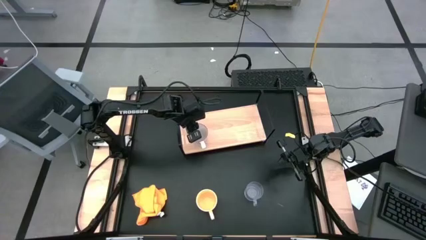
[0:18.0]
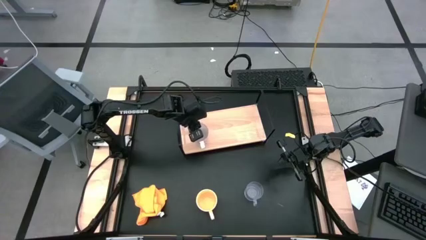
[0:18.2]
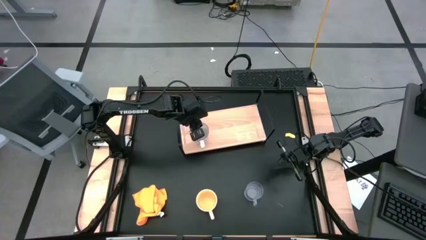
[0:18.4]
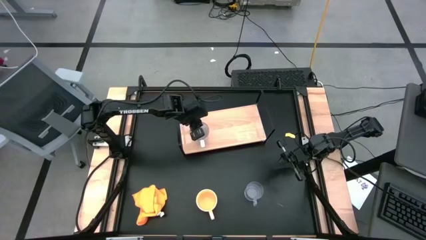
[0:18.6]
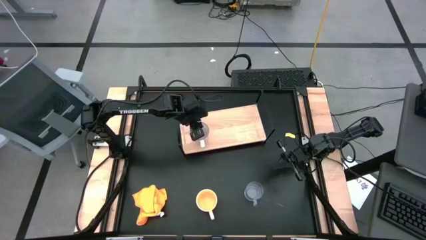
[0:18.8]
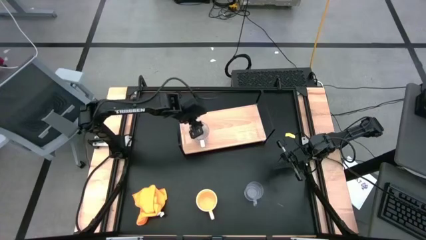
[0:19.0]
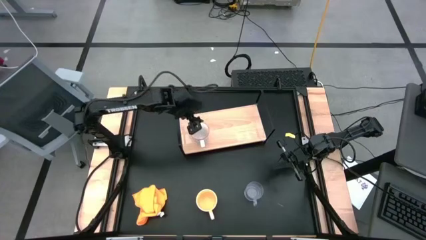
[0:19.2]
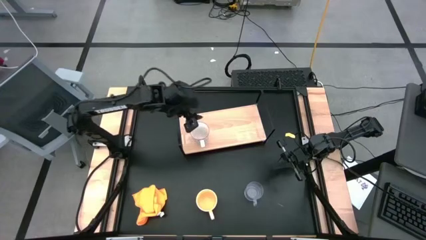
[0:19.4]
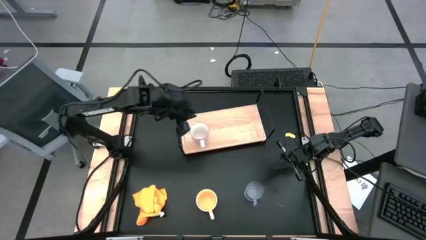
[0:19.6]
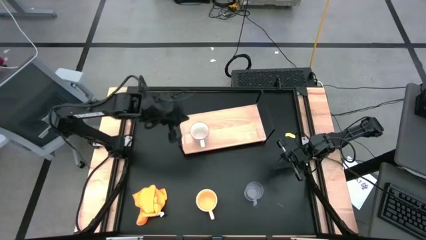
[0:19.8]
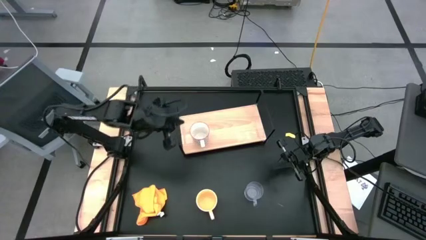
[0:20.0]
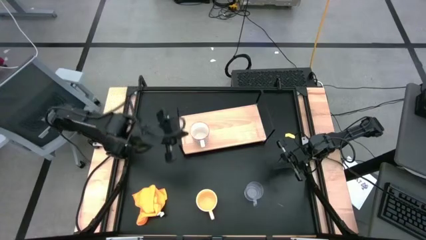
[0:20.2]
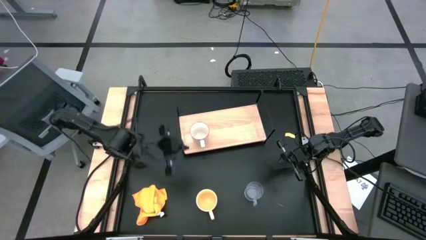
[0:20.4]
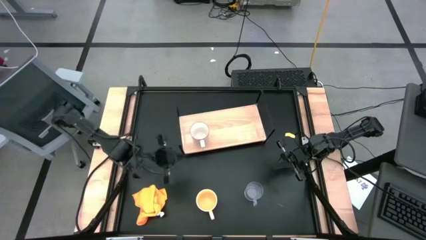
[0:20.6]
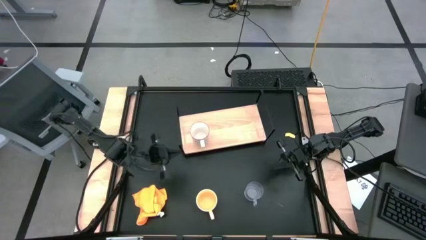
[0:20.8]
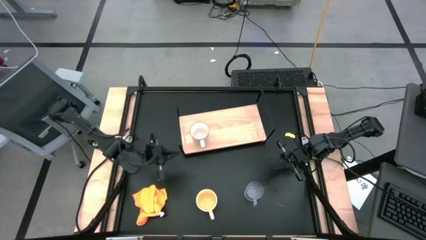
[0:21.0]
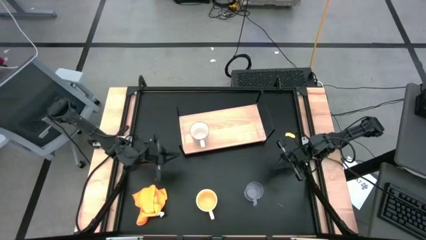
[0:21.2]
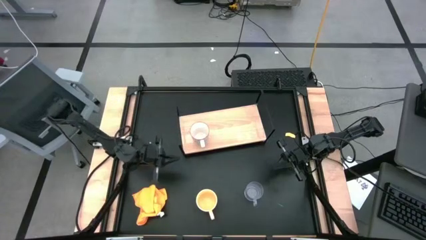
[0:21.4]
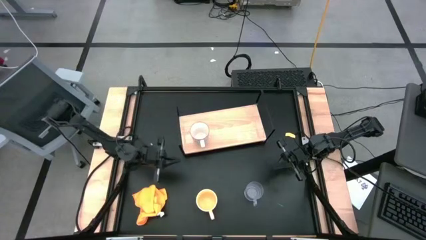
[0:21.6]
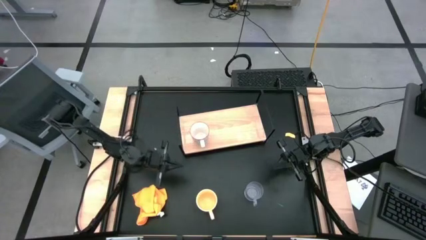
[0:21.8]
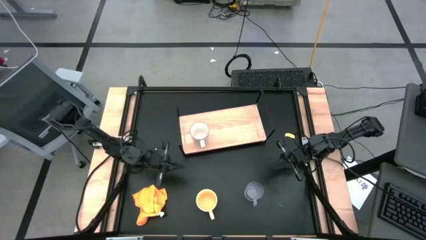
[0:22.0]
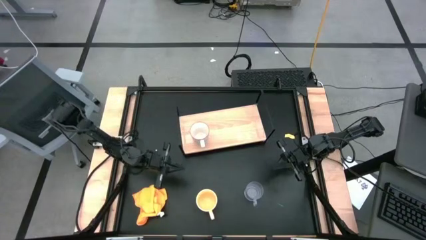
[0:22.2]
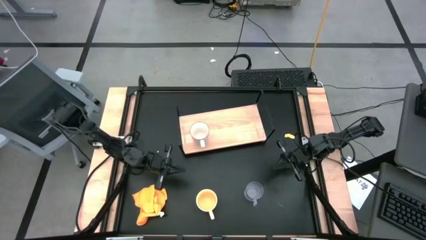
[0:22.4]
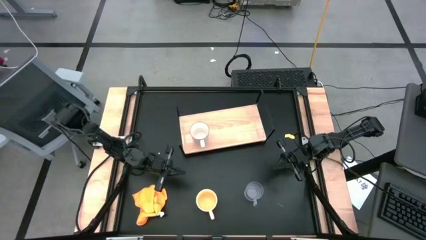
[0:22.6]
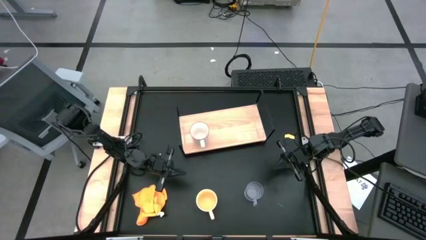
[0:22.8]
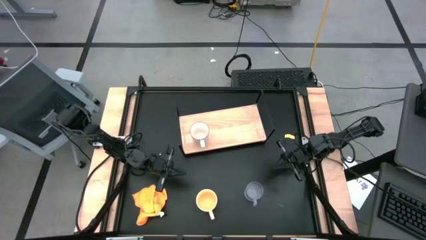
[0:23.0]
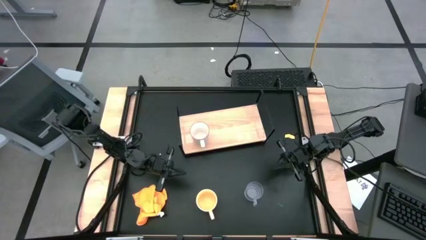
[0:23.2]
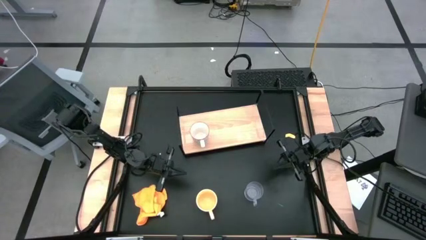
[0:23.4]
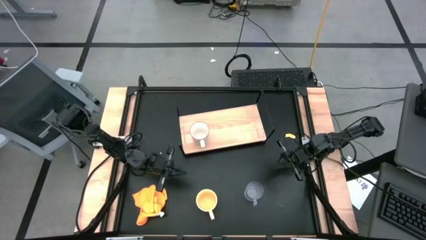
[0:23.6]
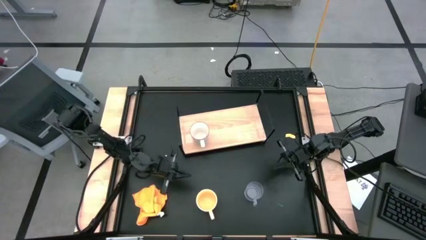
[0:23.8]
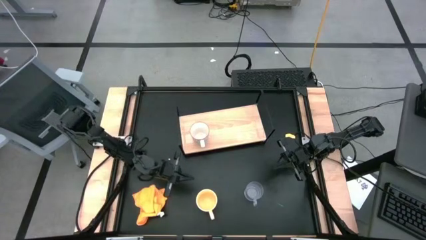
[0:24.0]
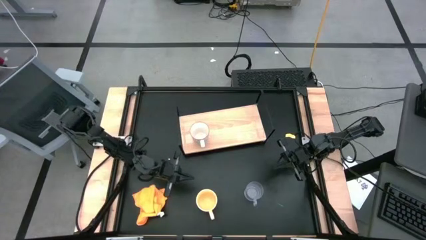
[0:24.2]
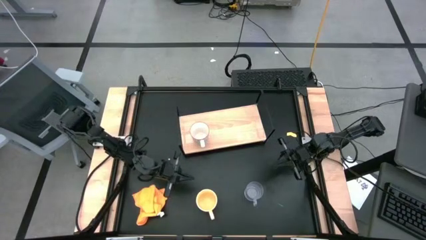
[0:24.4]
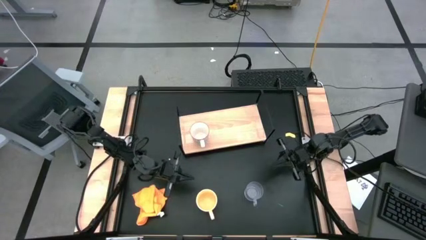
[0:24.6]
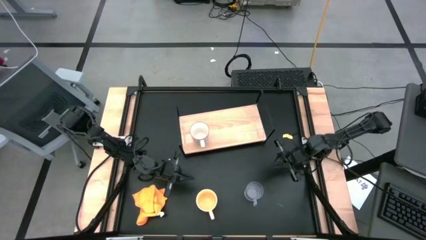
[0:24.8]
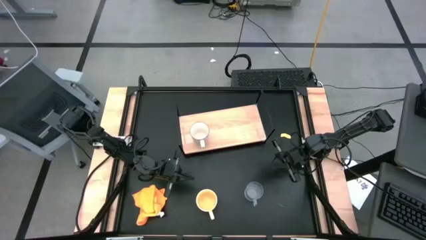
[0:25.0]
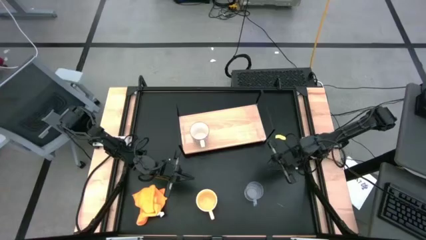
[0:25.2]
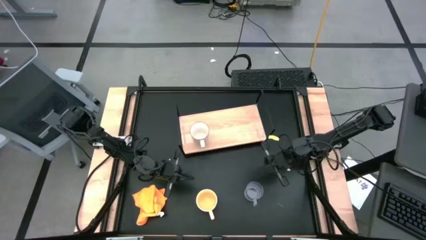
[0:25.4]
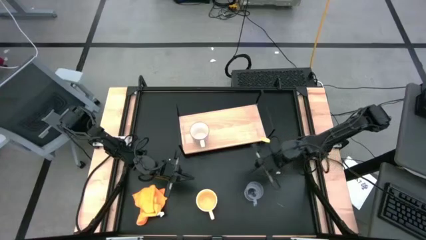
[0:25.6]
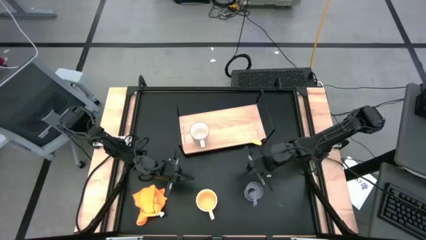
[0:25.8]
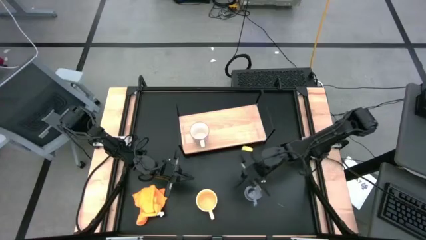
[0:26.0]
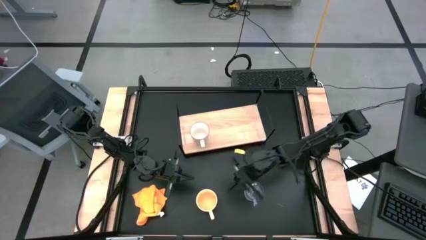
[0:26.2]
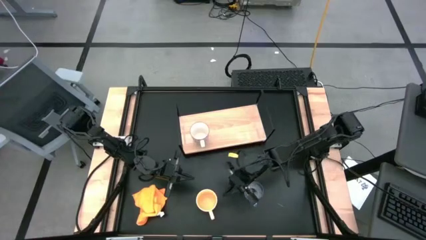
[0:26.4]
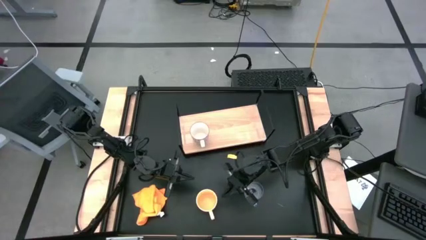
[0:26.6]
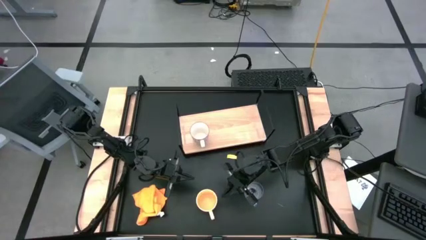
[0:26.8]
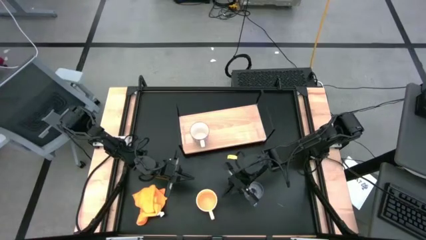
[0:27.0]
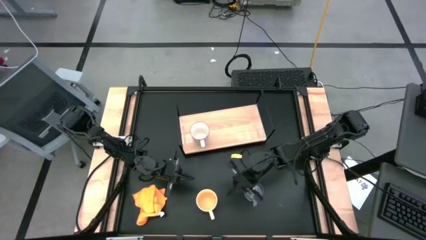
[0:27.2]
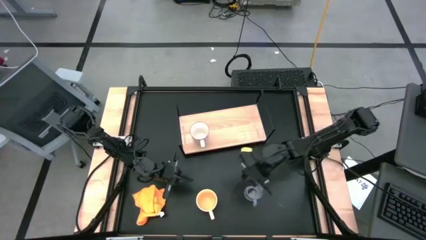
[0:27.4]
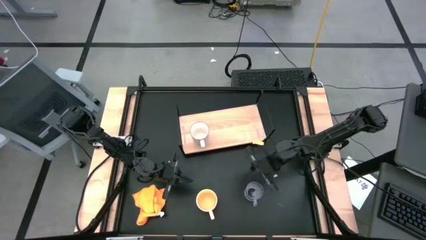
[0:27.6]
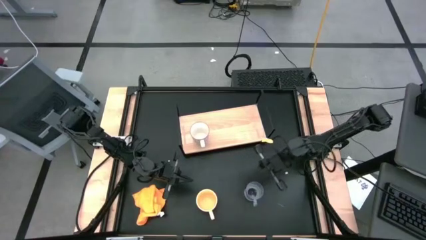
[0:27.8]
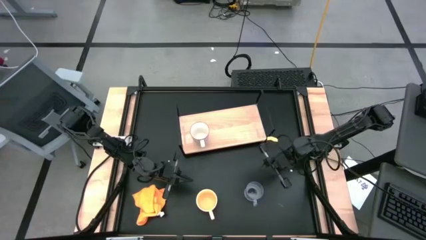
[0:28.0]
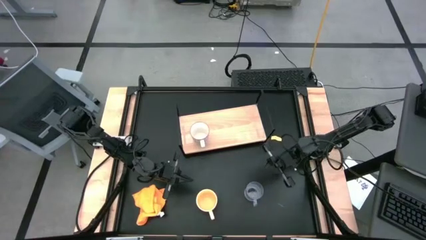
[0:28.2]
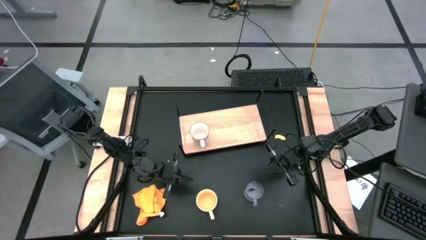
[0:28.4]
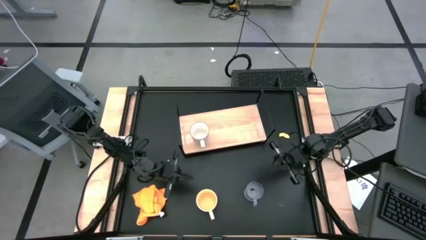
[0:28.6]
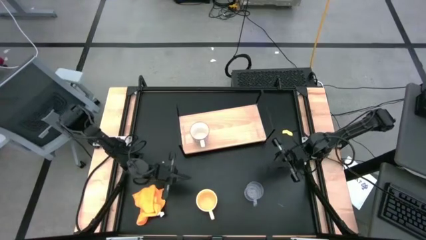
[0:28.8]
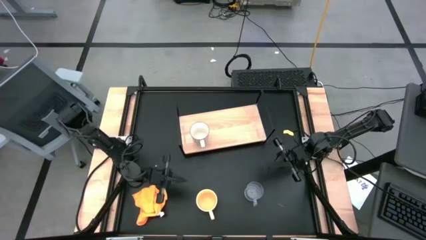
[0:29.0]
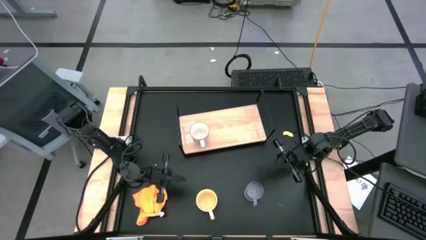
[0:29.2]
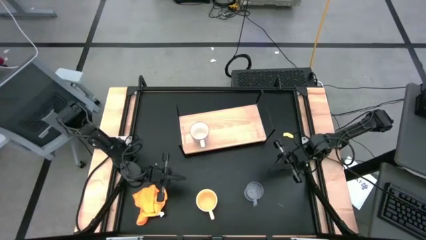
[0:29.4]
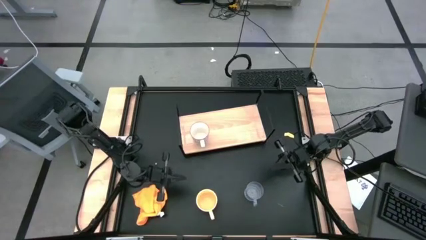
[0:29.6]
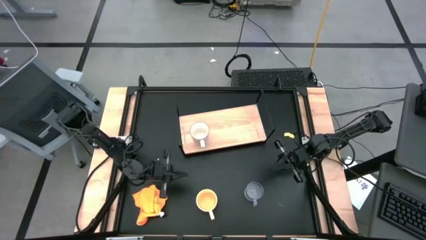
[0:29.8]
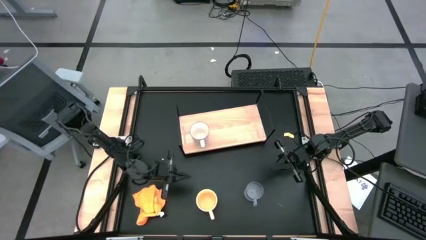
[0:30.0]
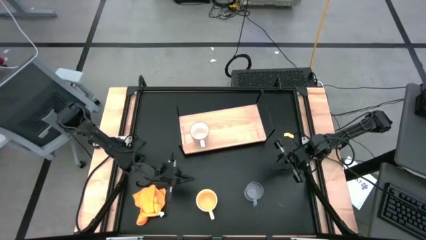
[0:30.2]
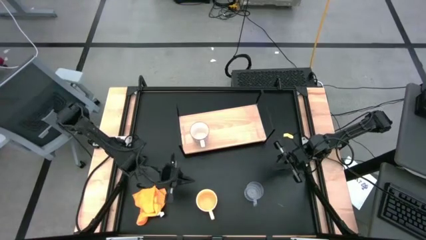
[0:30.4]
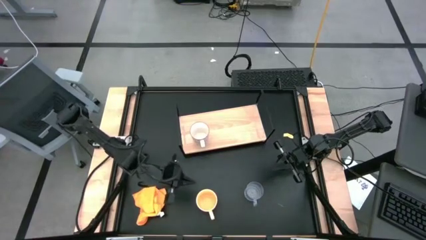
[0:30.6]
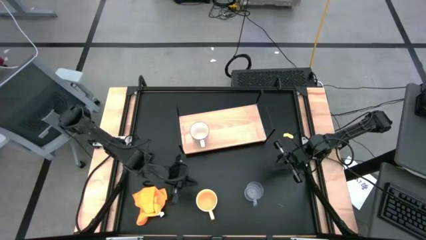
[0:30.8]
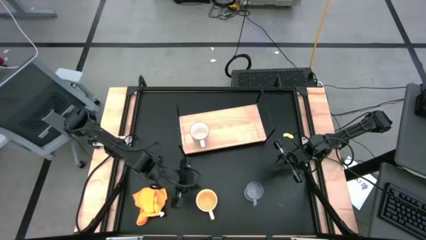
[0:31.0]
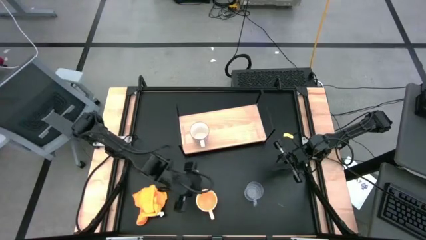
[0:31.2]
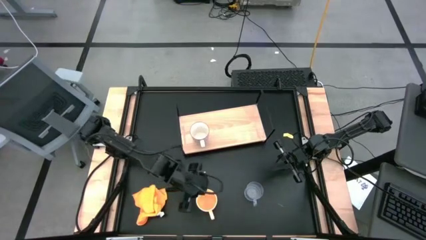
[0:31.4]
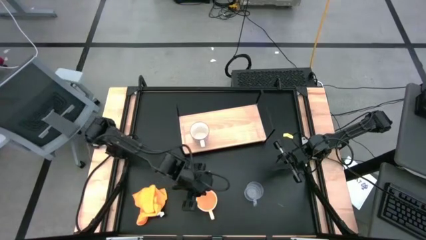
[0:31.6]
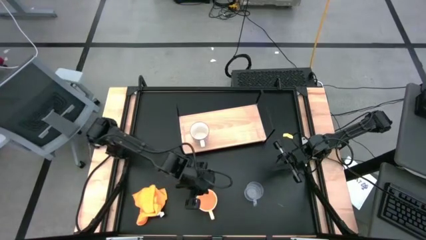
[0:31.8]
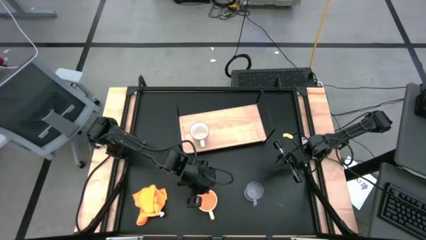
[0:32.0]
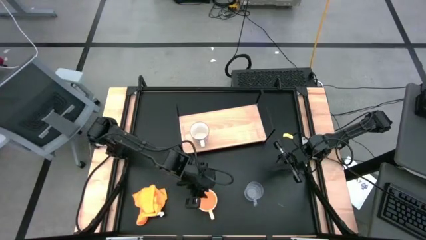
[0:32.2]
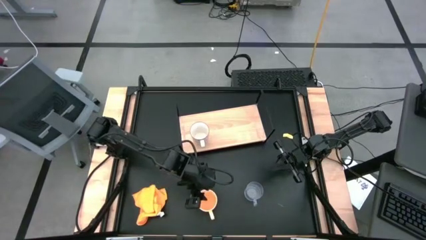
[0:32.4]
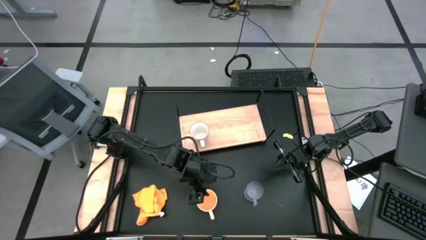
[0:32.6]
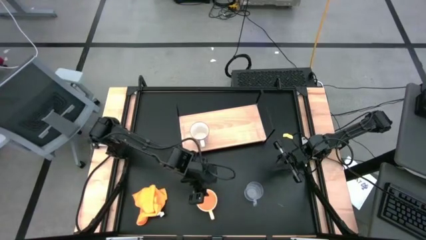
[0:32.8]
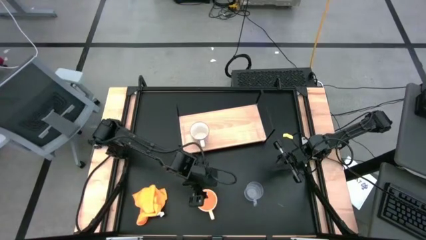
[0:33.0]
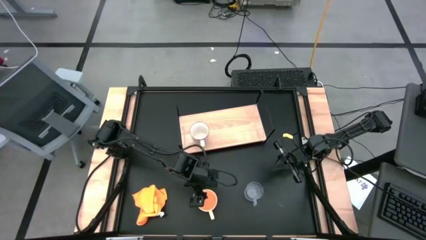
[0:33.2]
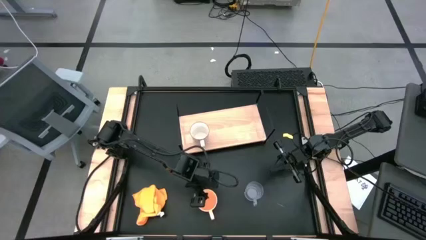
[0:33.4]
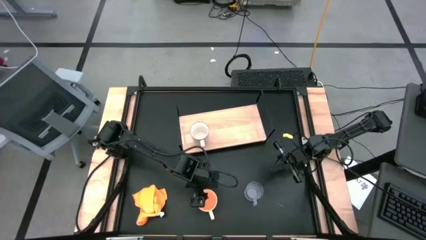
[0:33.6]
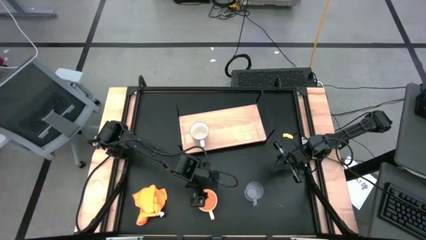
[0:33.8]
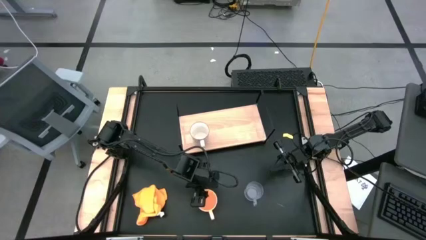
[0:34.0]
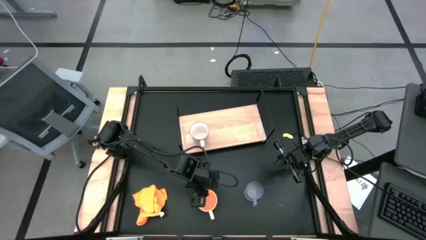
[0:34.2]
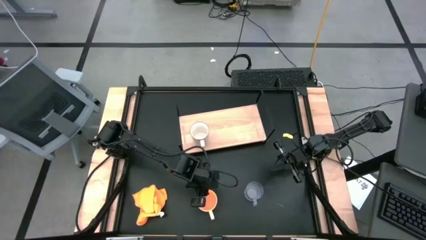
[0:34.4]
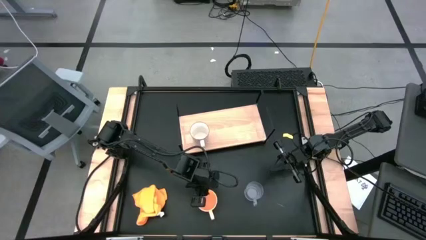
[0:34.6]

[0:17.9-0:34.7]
Task: Stack small to large cups/mugs on shelf
Put the yellow mug on the shelf
